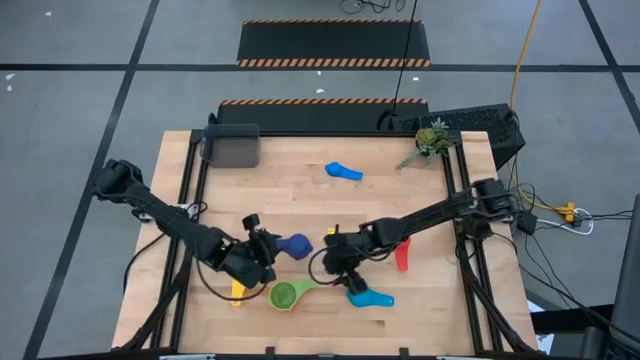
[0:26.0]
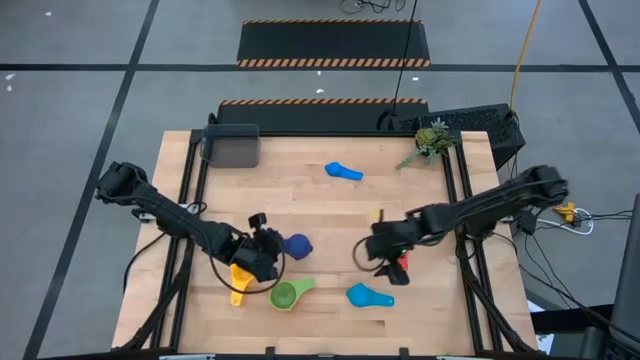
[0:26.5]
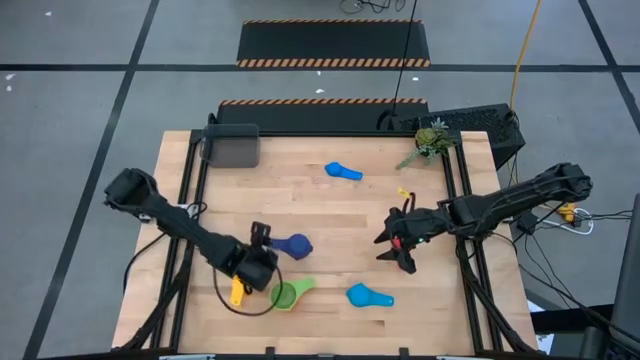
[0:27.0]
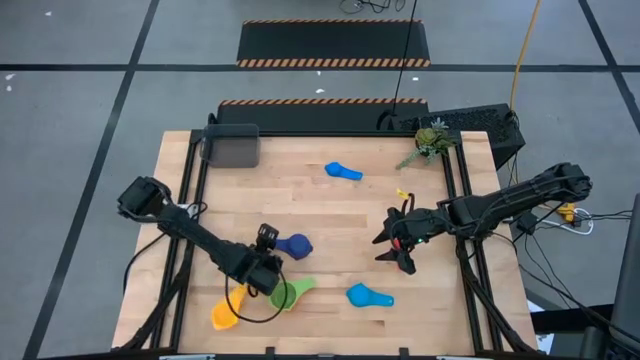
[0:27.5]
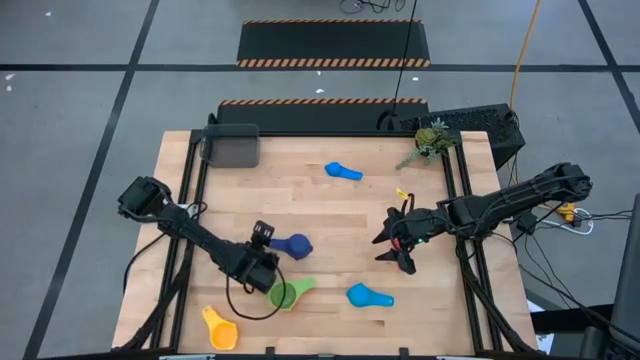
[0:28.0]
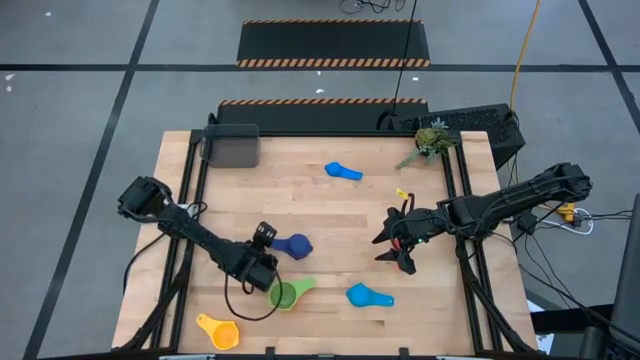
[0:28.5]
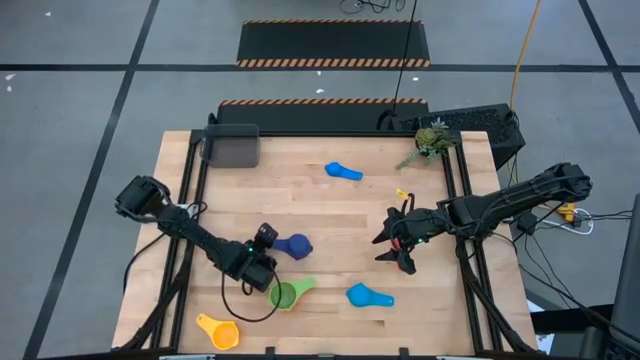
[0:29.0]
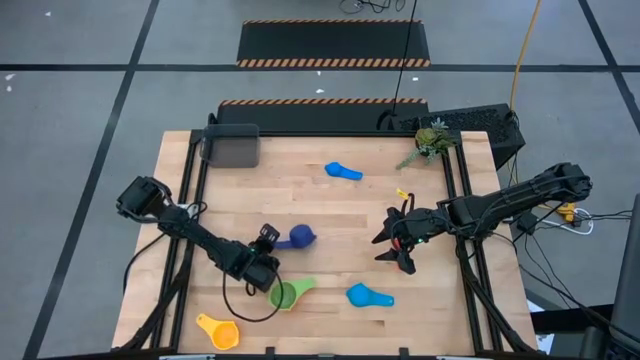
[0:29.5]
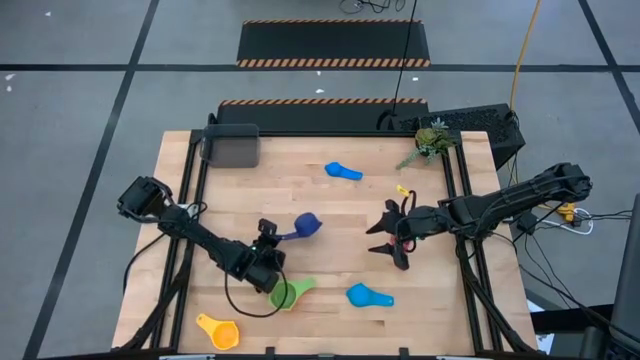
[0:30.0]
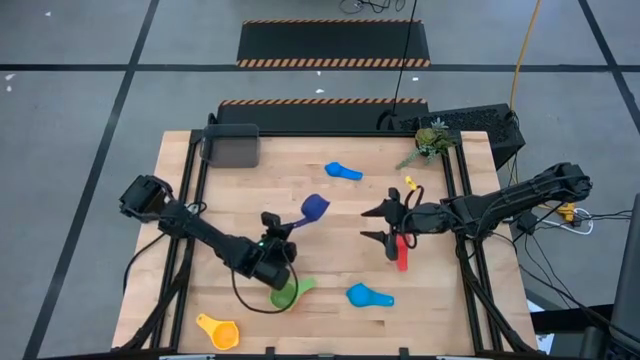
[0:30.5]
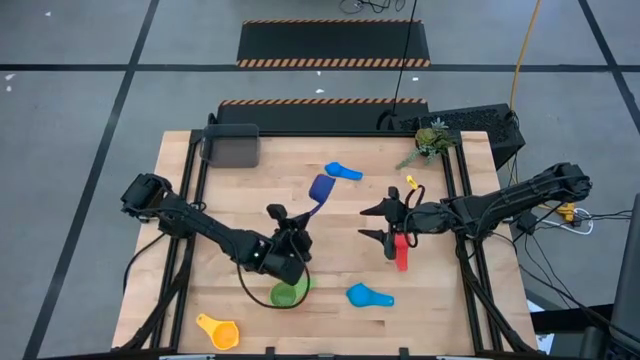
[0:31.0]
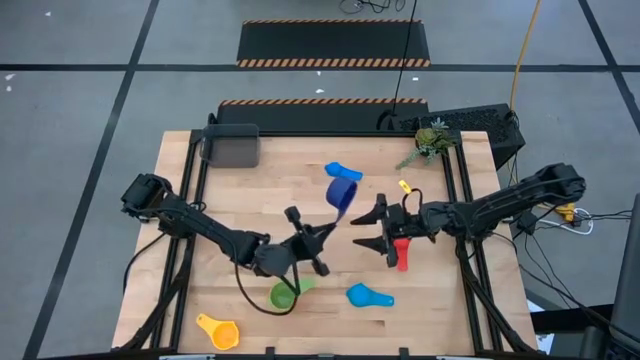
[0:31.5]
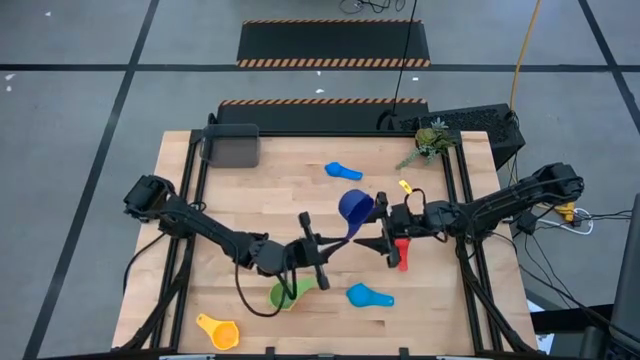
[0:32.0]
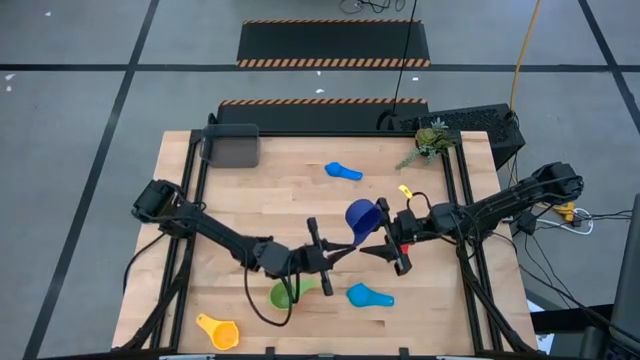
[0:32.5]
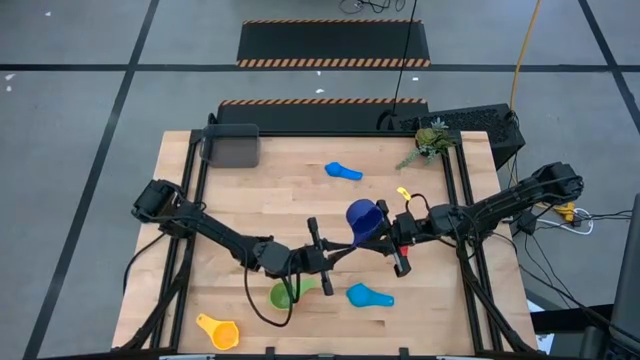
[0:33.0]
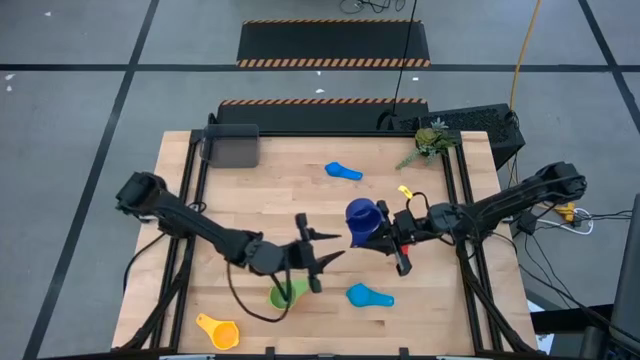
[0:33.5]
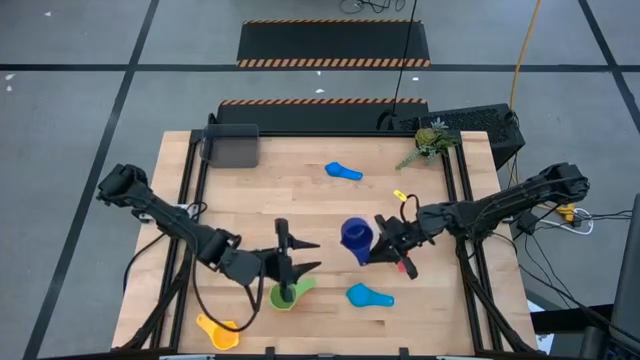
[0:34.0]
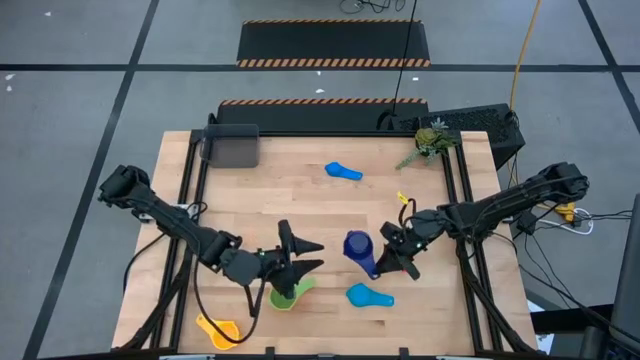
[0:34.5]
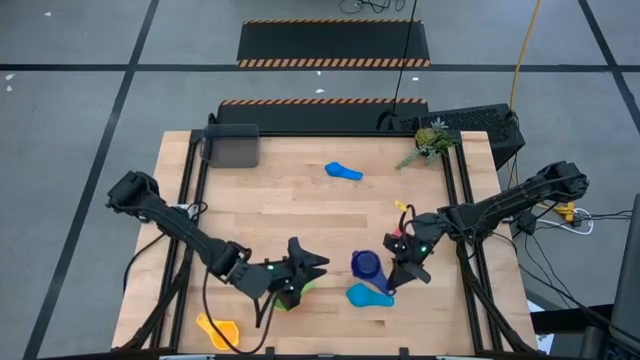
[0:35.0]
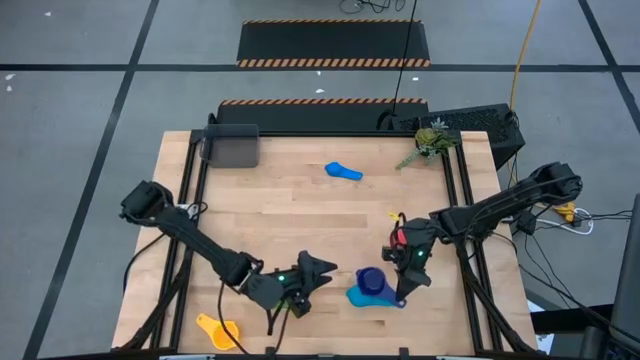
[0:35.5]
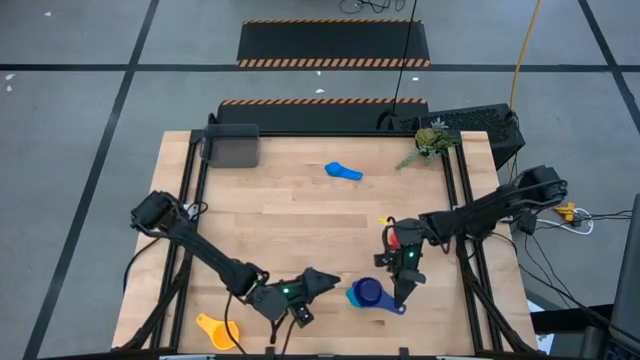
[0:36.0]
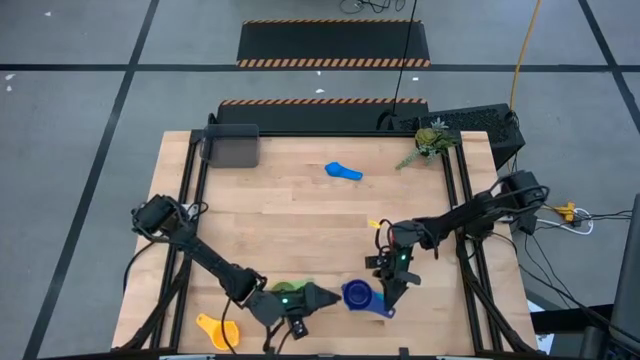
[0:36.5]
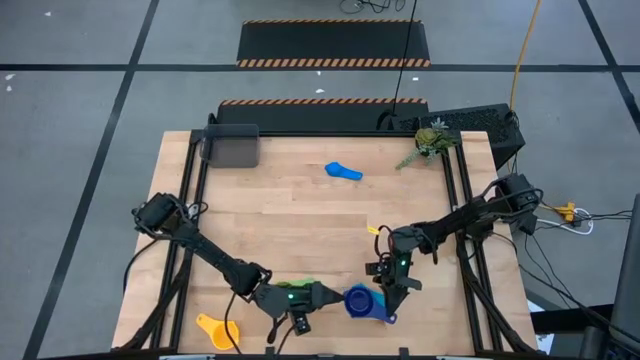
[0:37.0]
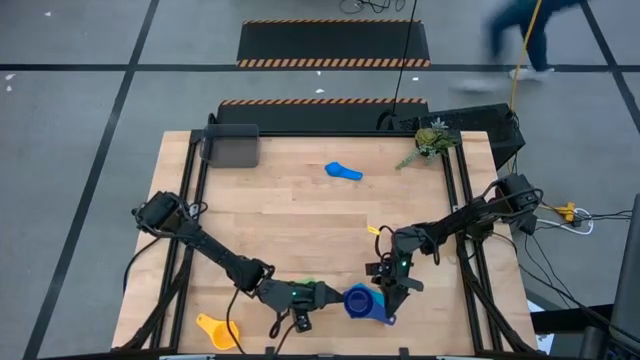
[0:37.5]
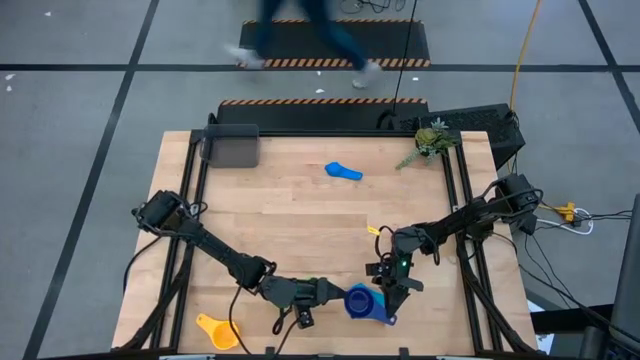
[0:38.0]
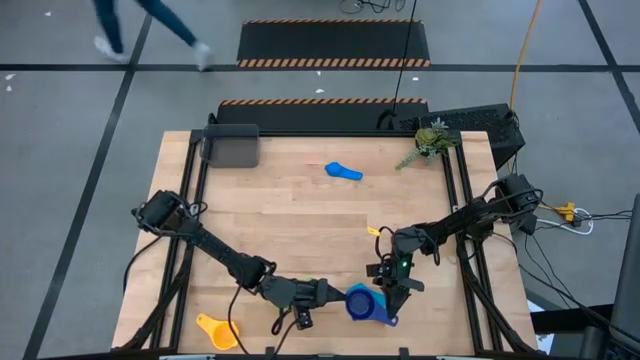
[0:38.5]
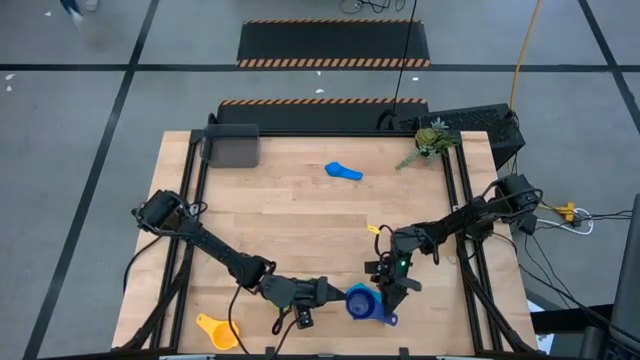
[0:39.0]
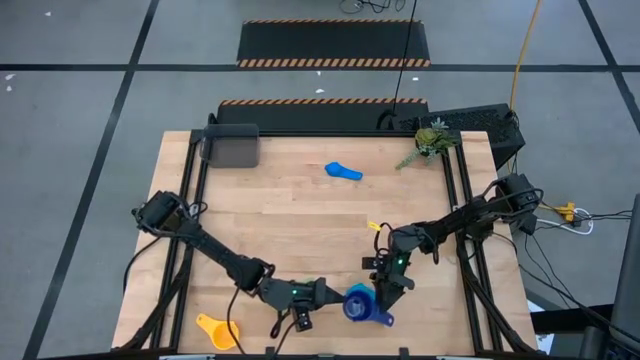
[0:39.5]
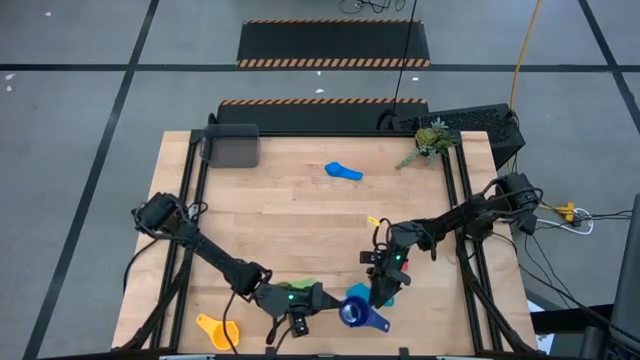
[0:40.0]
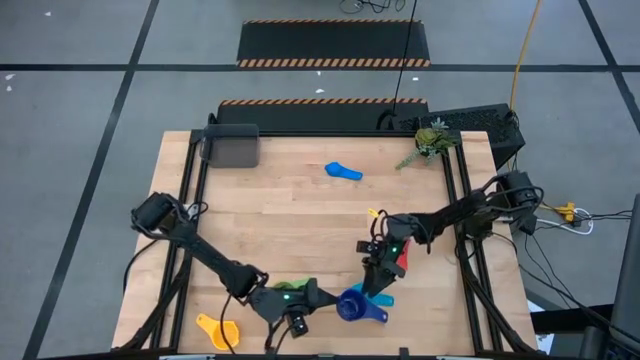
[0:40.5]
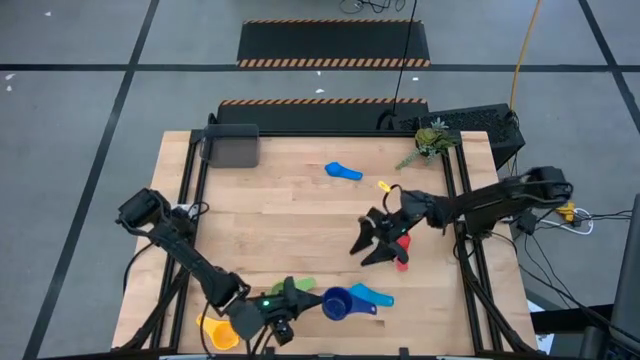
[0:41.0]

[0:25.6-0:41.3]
Task: Nest measuring cups in basket
Stack the purple measuring cup on top of the green measuring cup

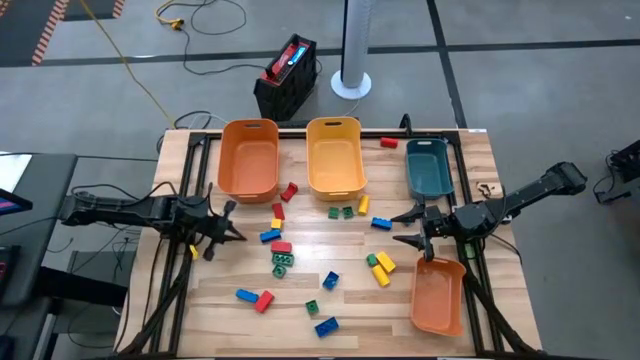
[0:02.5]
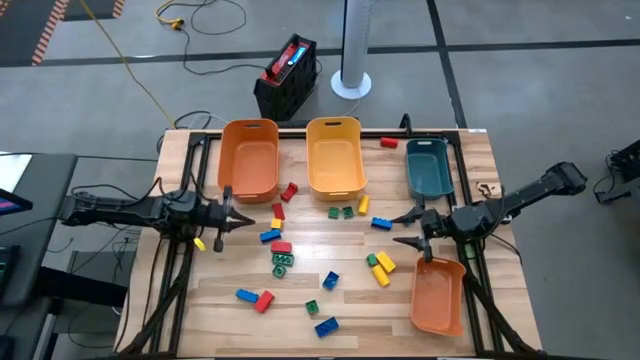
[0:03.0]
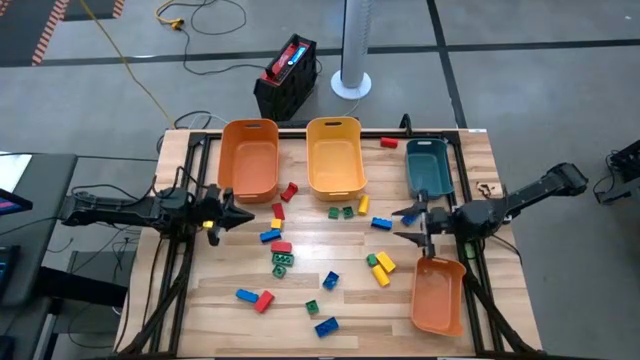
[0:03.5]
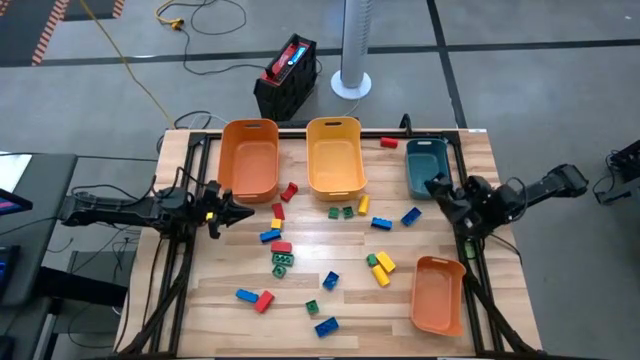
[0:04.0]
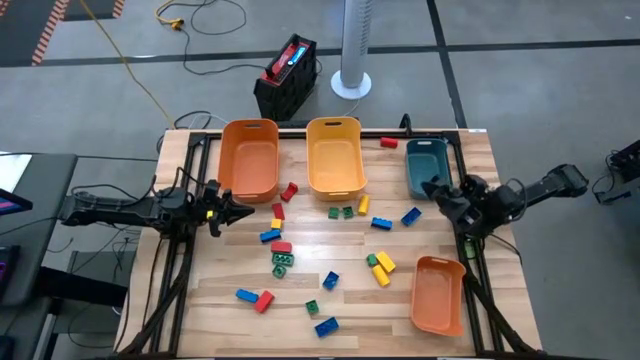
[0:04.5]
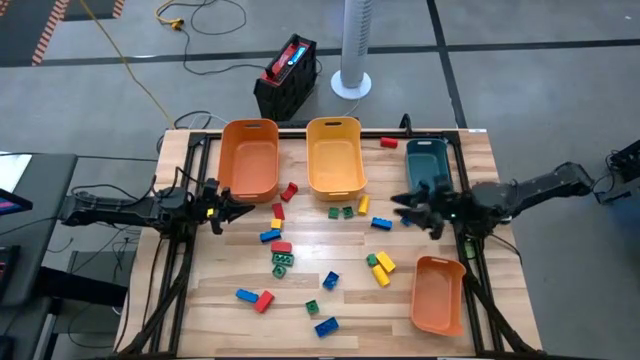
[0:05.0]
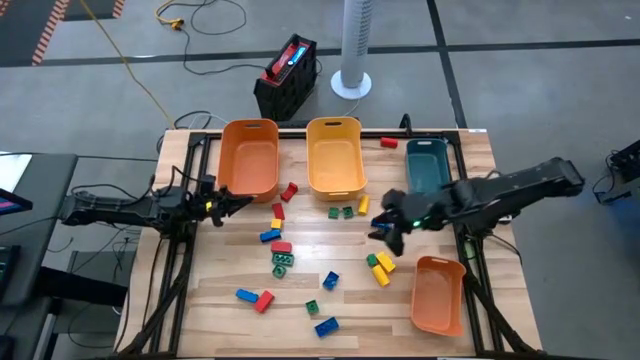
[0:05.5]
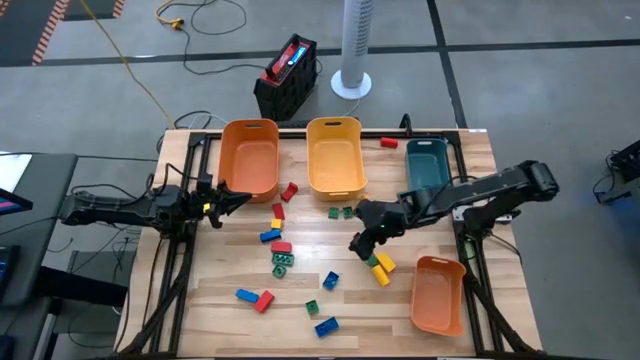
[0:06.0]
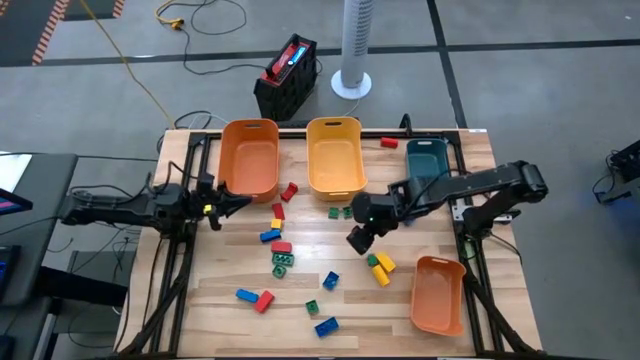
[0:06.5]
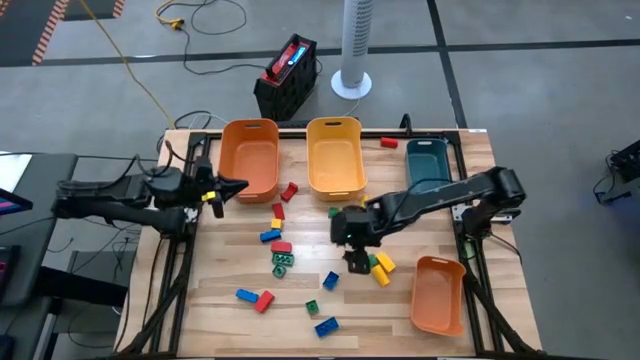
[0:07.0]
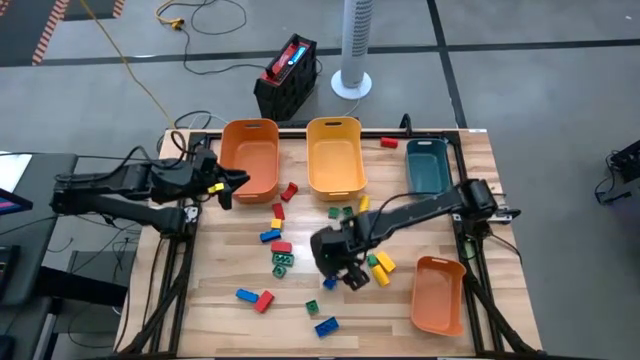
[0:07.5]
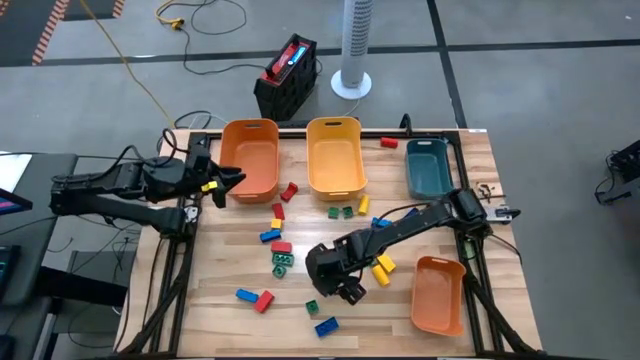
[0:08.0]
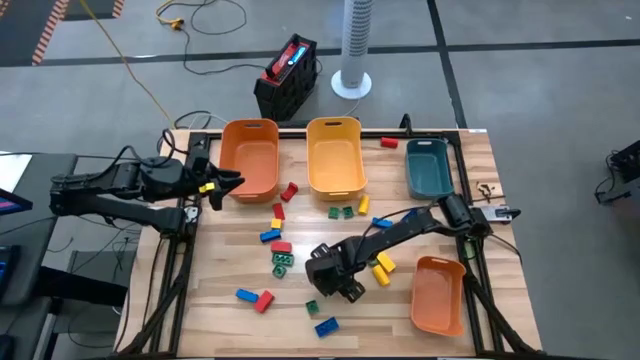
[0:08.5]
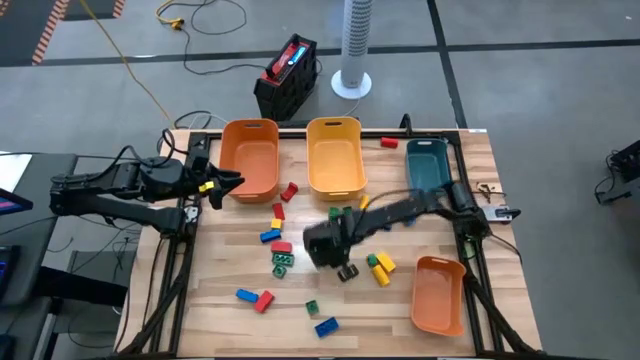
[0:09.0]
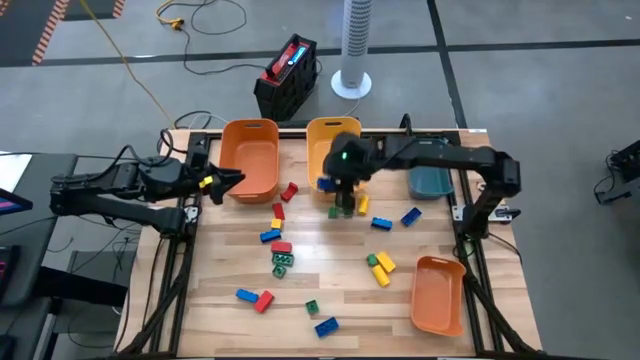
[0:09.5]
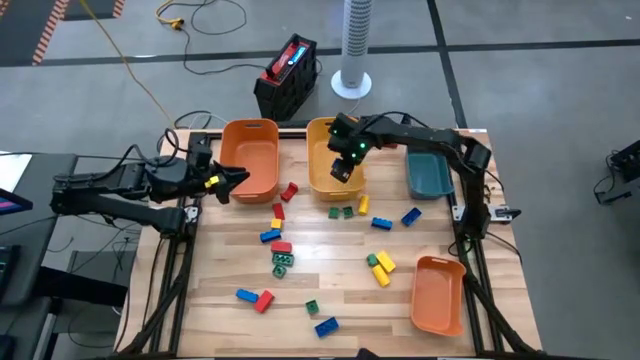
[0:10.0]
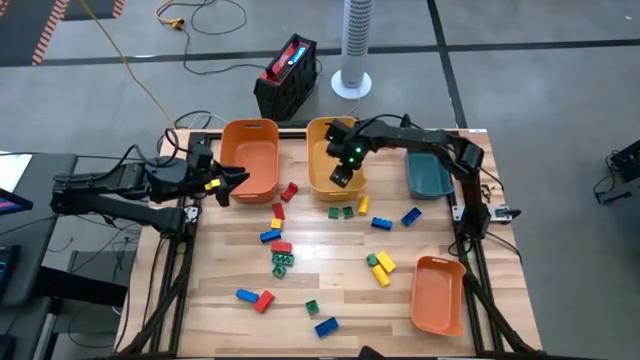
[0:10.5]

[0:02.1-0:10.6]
Task: Sort blocks
Put the blue game piece into the yellow bin
